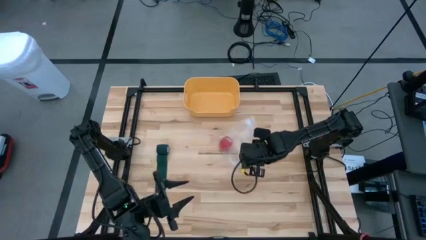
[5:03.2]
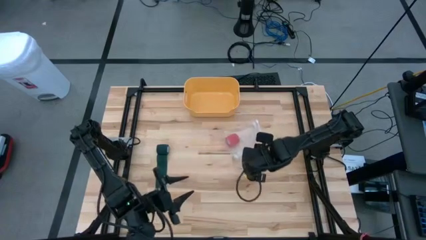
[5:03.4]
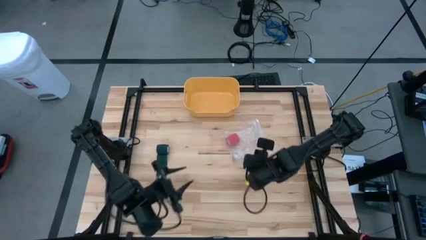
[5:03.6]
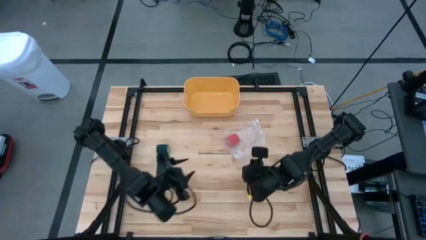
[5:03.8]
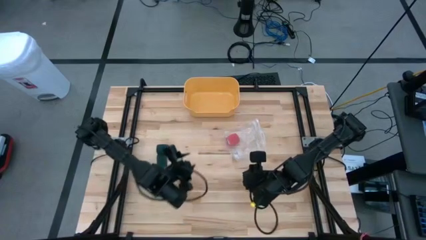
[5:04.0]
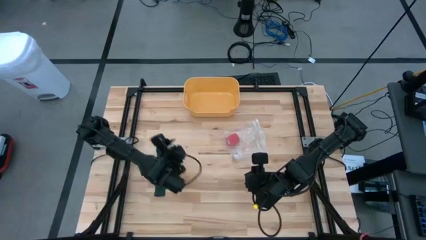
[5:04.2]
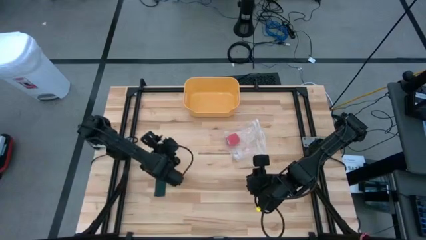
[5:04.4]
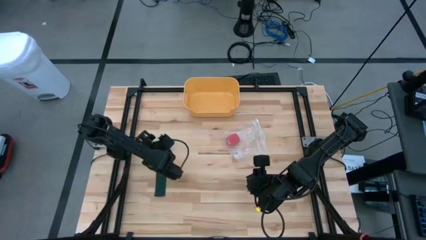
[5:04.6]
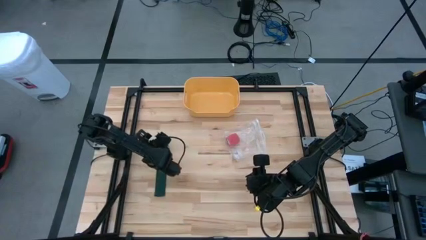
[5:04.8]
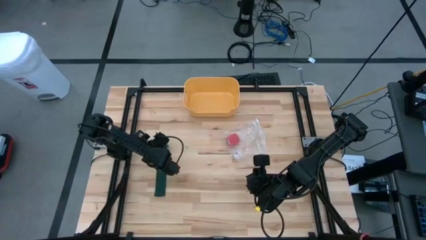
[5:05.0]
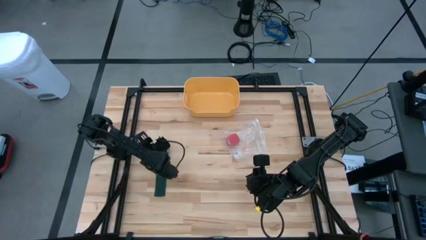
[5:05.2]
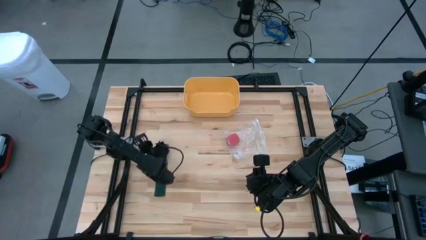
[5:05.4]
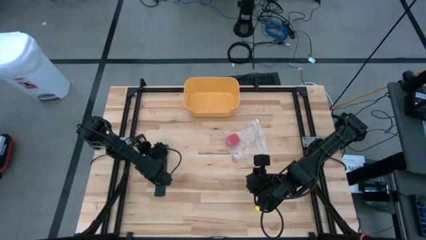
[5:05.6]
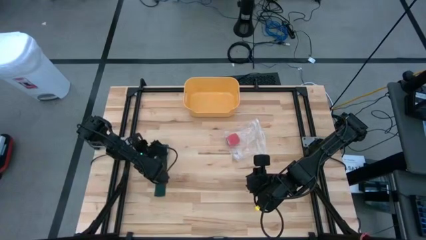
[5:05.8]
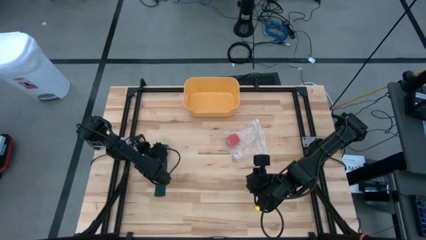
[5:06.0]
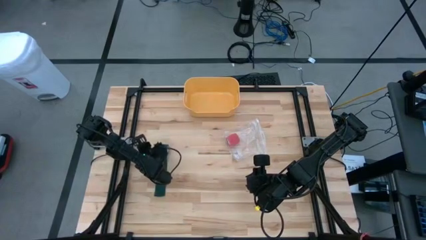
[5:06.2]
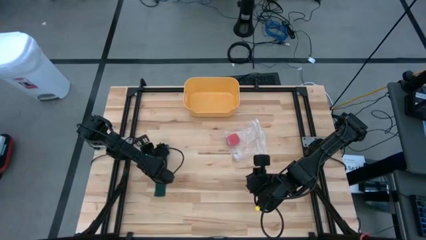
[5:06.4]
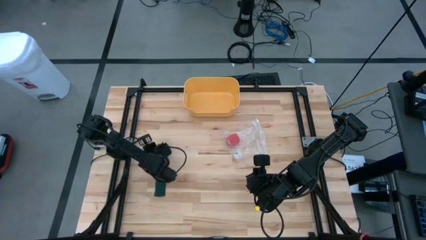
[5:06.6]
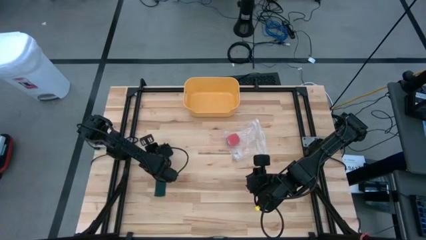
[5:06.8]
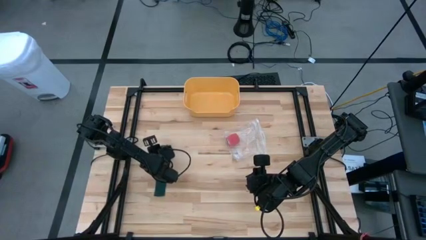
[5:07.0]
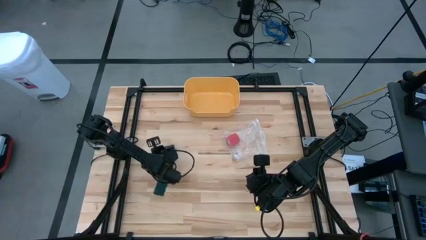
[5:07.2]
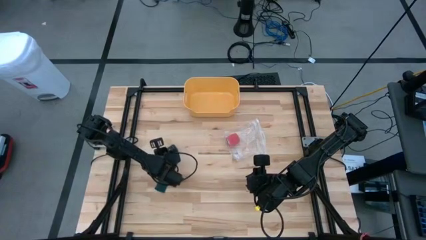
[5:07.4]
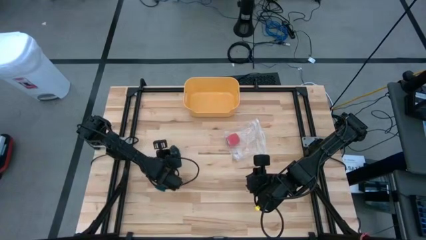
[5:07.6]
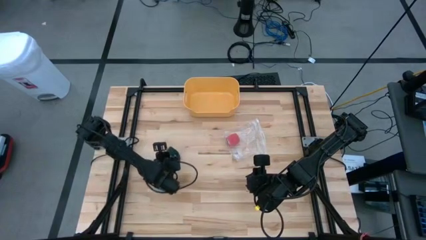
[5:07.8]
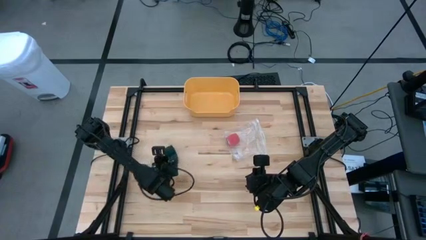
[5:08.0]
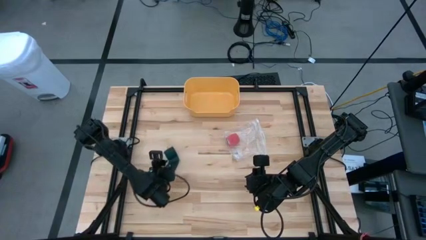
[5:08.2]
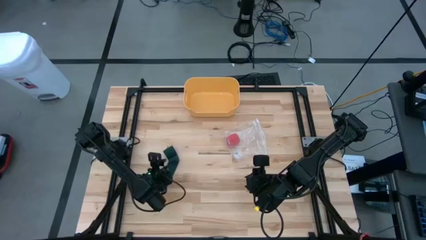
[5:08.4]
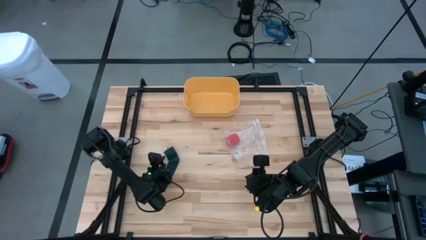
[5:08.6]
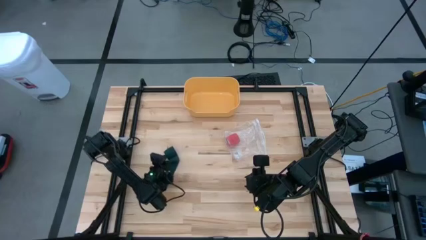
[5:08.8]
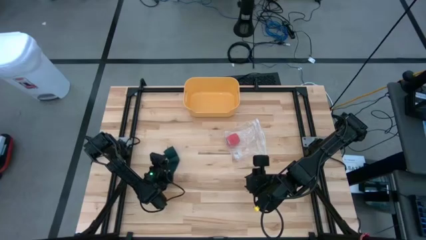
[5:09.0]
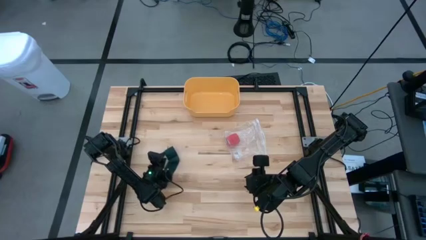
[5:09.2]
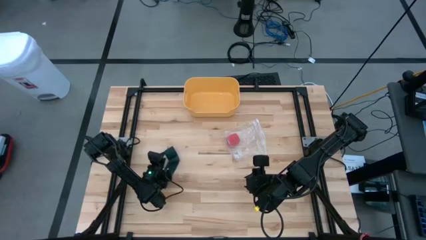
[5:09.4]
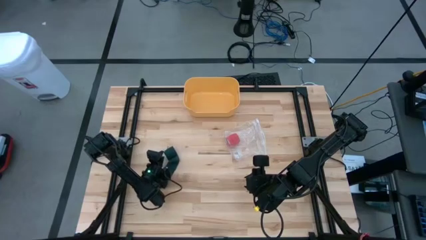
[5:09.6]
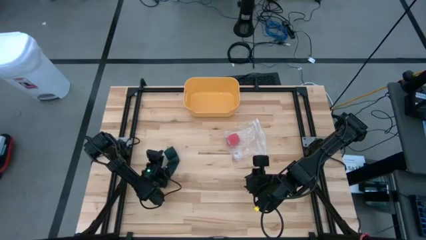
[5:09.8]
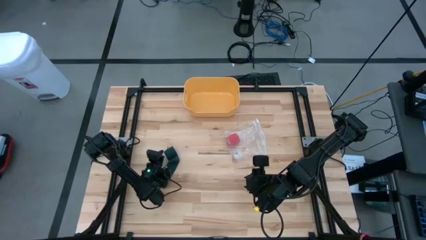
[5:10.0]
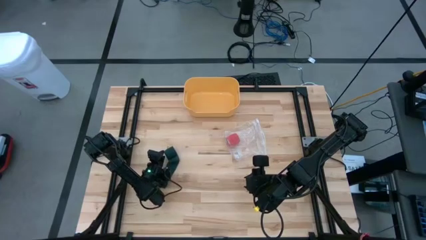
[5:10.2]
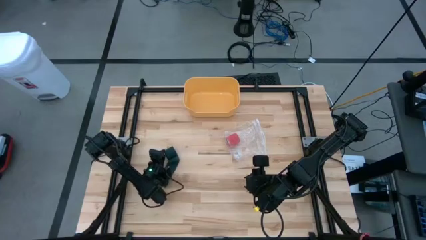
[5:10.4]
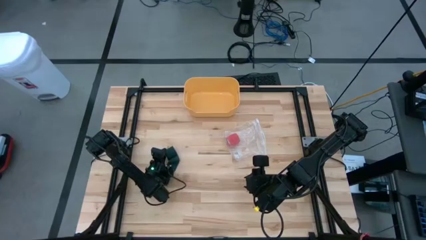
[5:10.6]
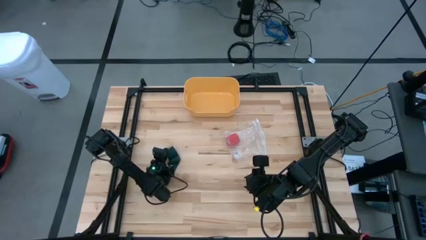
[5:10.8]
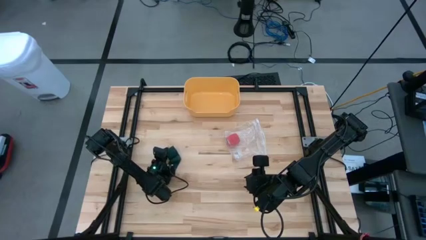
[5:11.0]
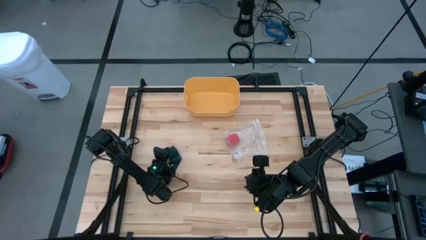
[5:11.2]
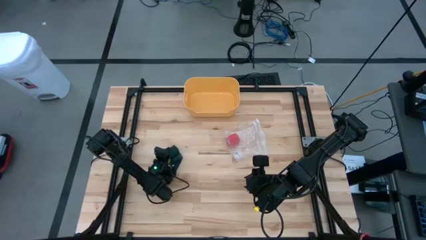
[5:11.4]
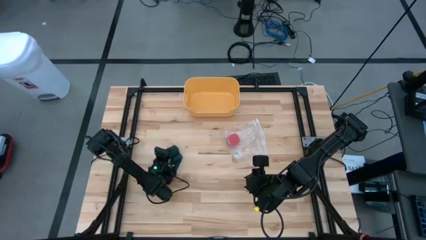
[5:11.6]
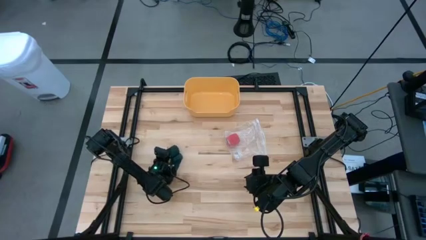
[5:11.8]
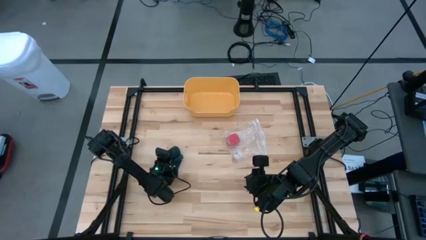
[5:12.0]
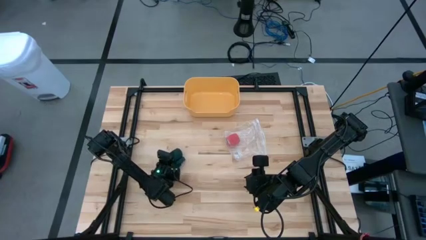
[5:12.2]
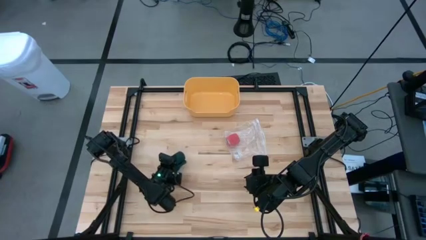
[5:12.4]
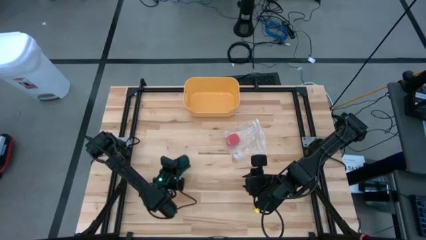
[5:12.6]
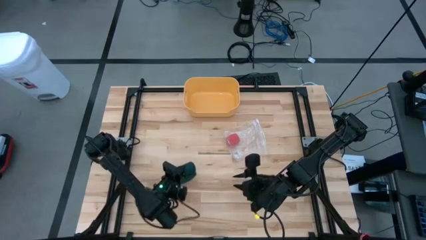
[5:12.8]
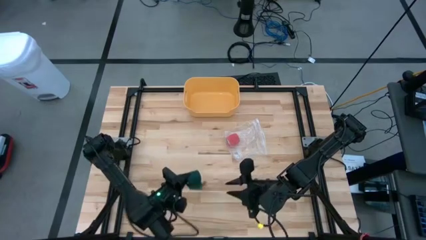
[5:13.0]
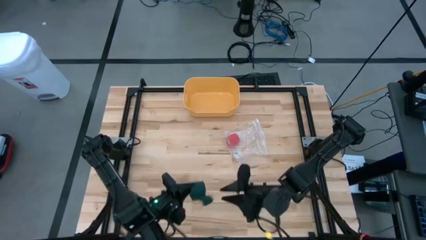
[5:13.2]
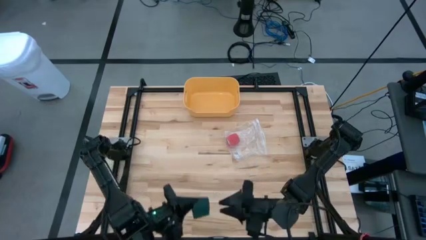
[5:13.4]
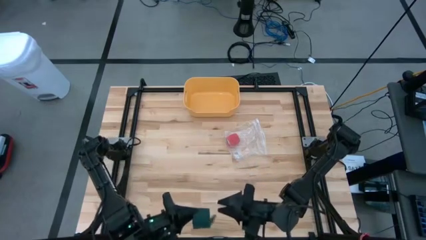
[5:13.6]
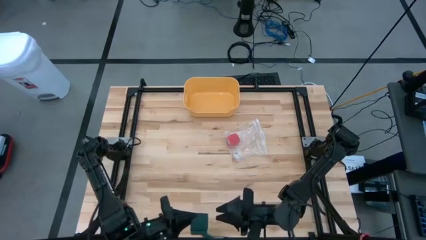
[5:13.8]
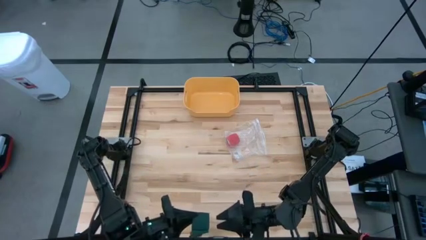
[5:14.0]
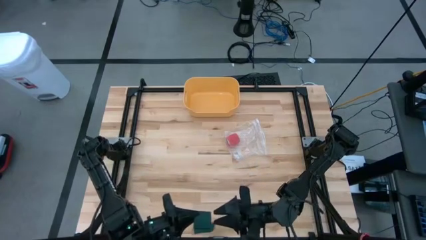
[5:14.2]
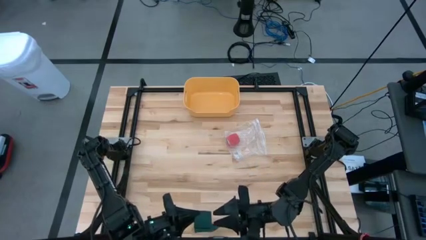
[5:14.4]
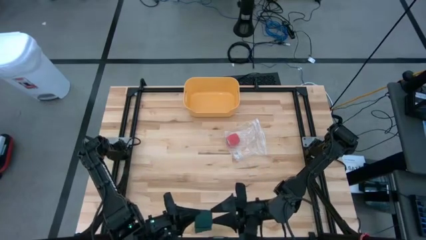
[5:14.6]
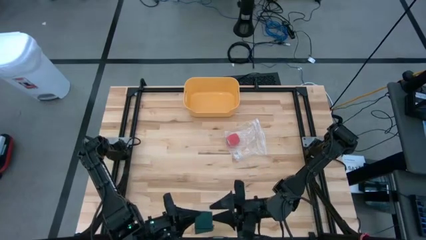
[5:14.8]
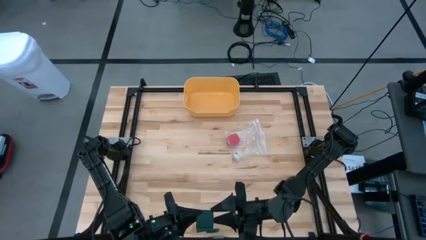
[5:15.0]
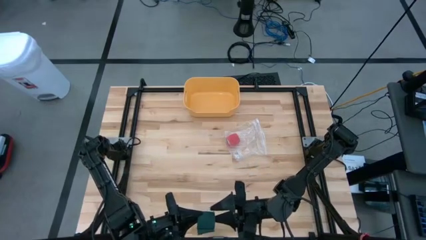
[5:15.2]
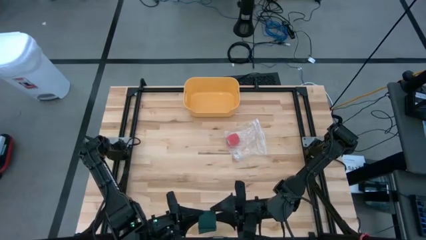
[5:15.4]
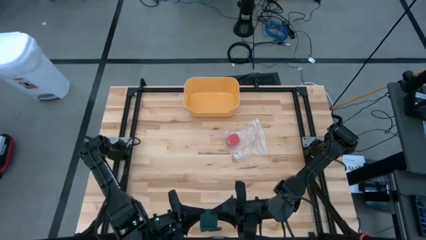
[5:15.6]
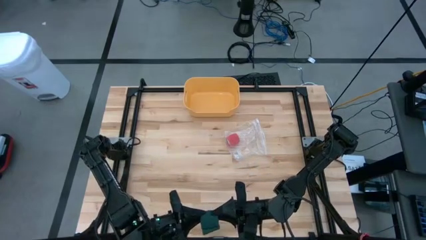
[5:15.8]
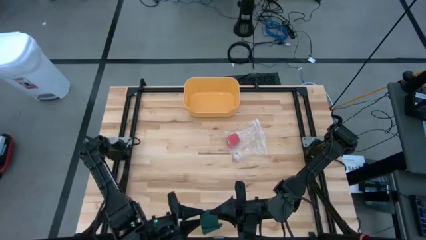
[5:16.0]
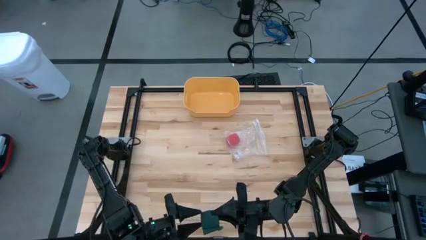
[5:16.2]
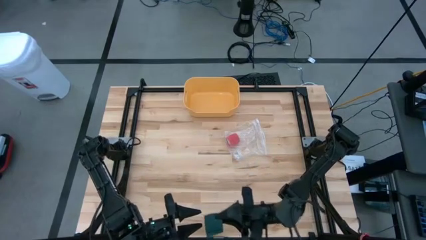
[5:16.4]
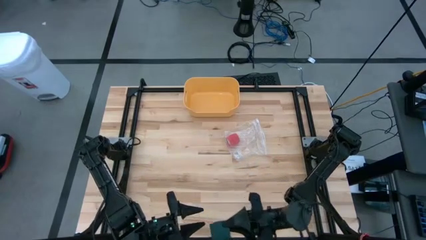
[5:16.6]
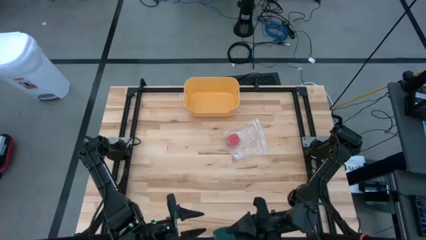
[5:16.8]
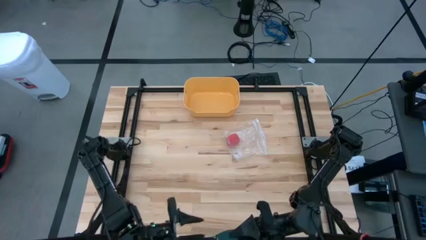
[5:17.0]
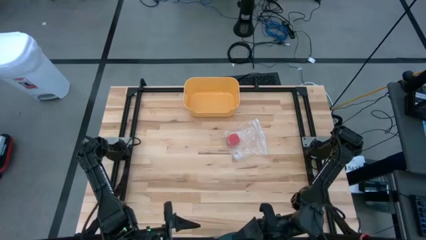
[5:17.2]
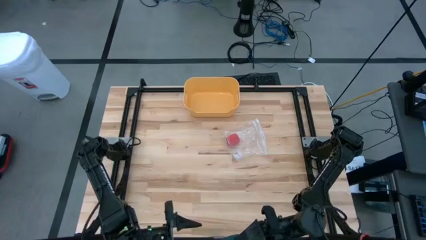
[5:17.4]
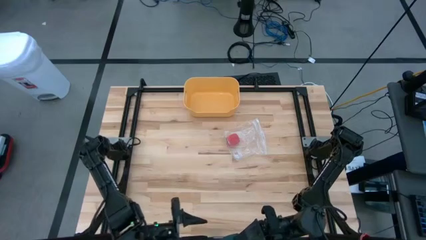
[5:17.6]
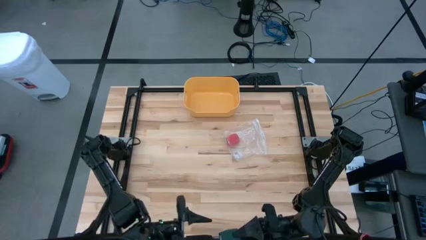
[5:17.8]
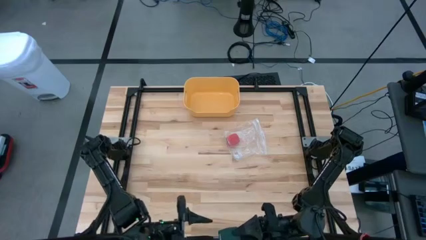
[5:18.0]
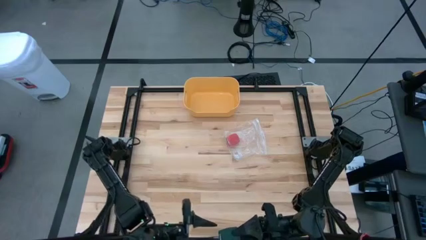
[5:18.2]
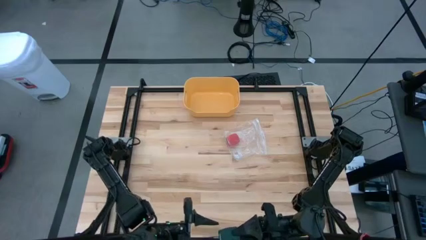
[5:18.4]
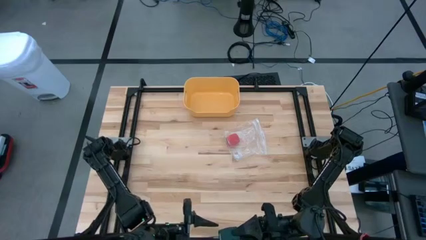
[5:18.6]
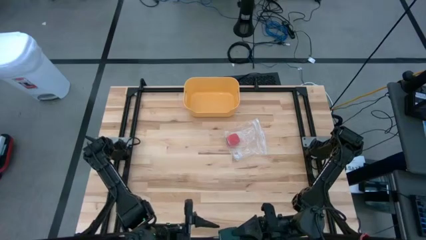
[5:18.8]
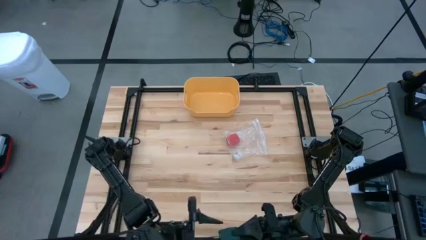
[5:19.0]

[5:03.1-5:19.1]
Task: Roll bandage
Roll the green bandage
